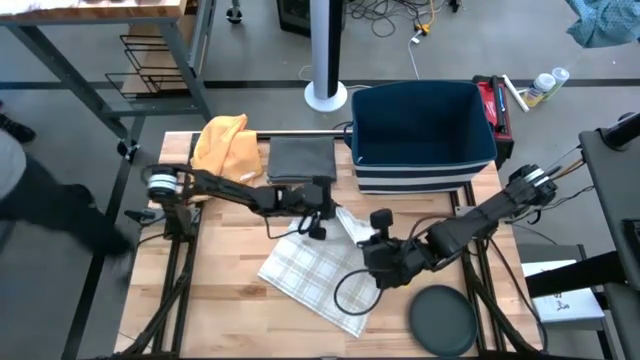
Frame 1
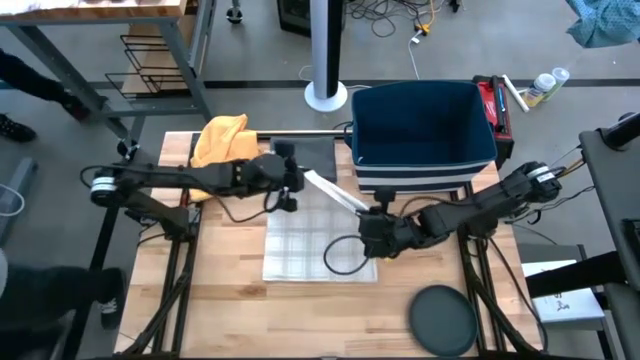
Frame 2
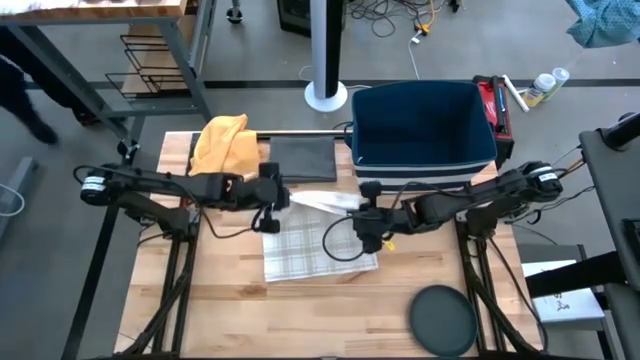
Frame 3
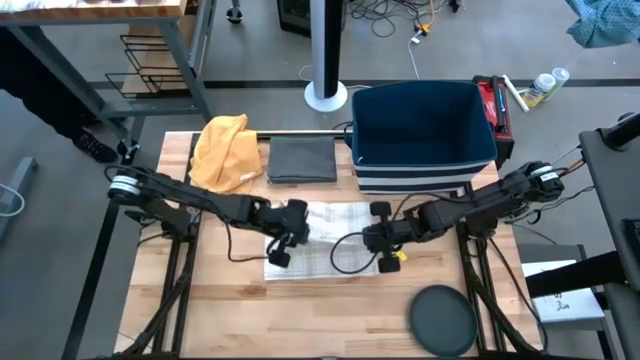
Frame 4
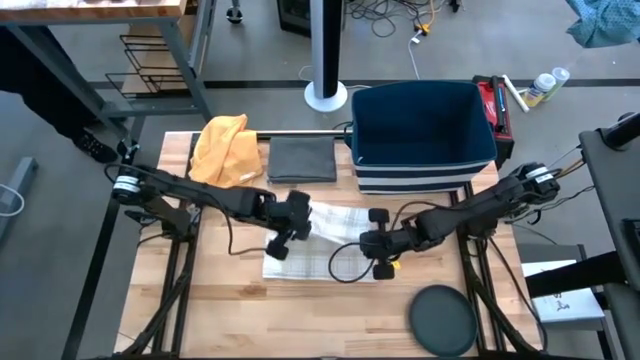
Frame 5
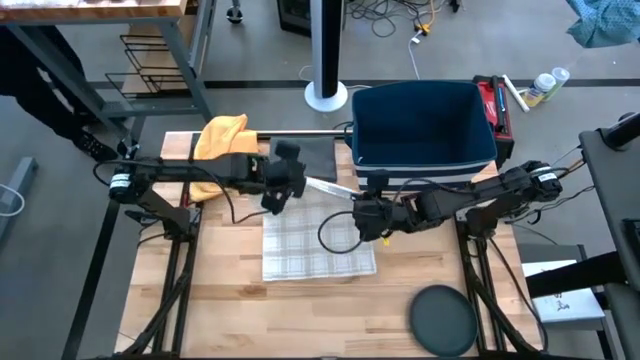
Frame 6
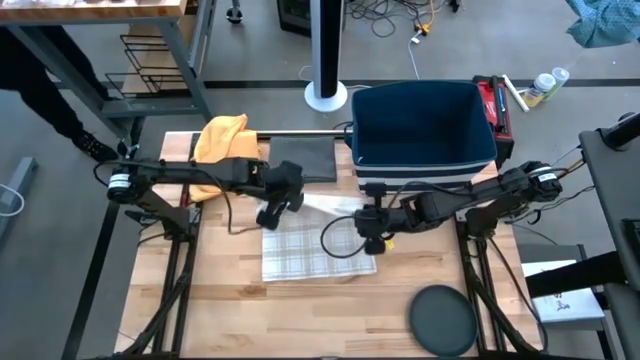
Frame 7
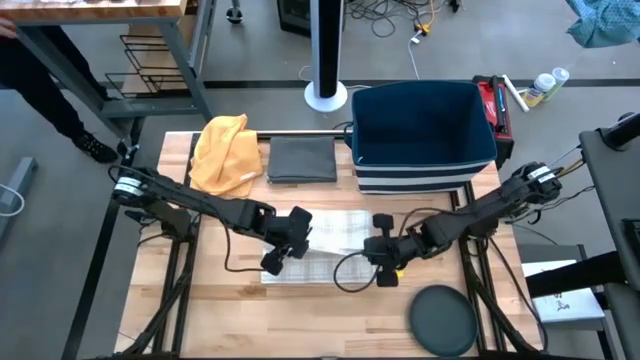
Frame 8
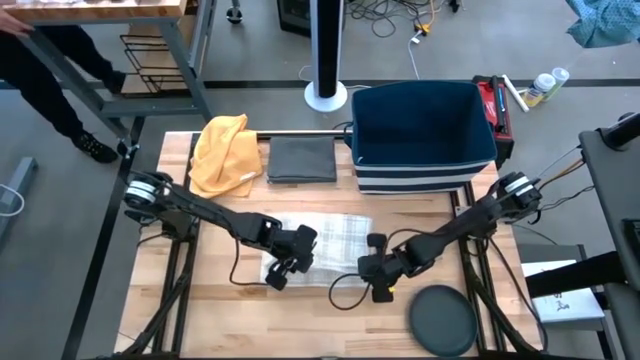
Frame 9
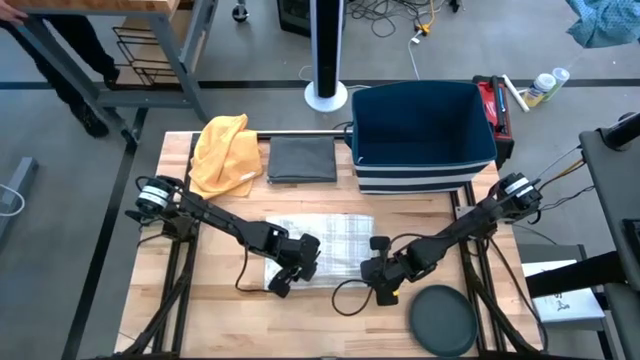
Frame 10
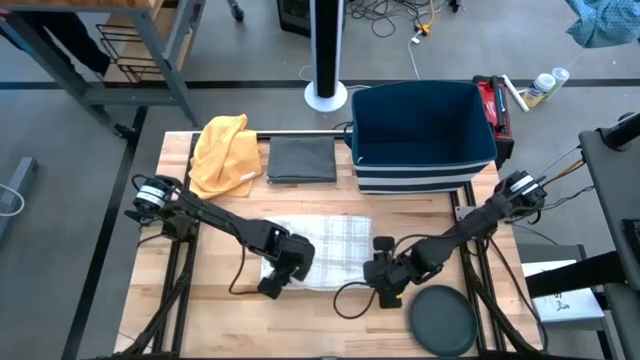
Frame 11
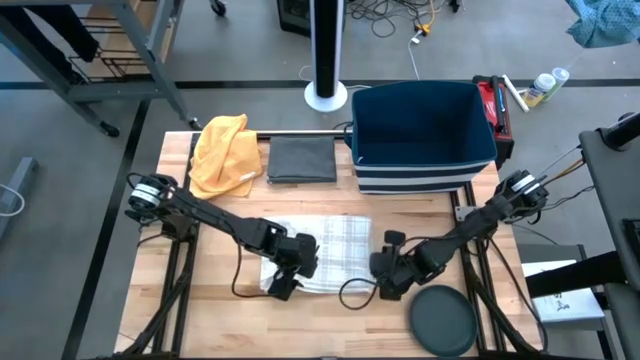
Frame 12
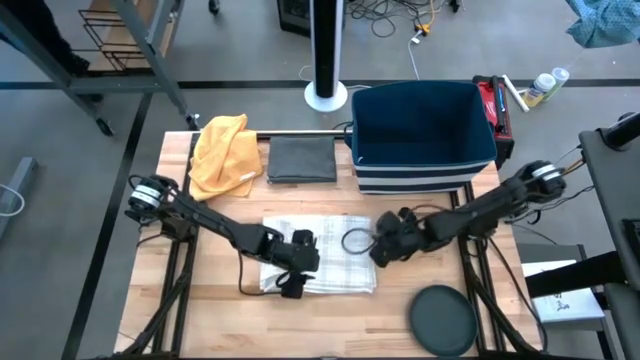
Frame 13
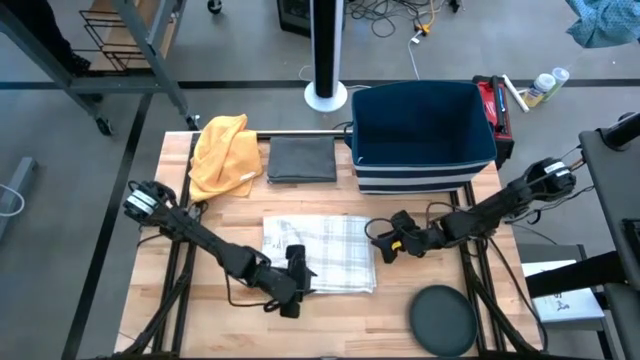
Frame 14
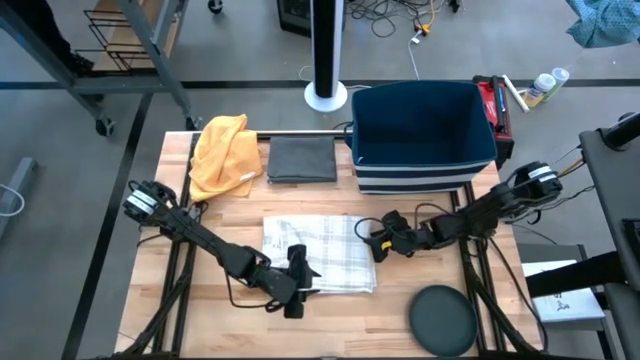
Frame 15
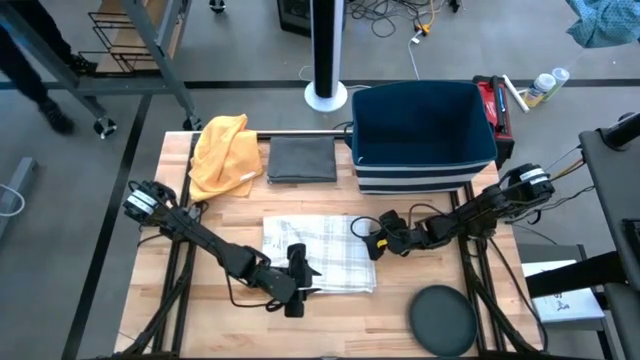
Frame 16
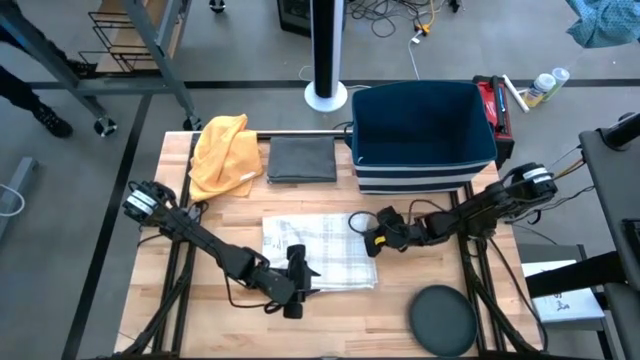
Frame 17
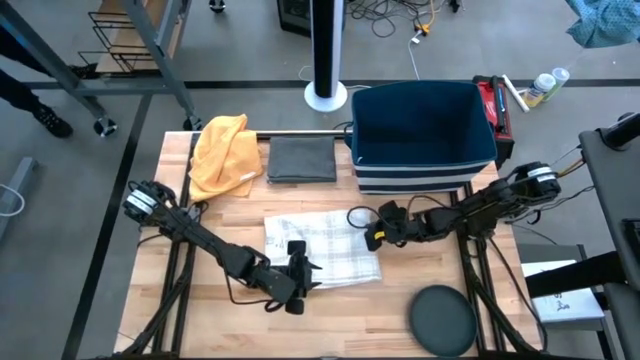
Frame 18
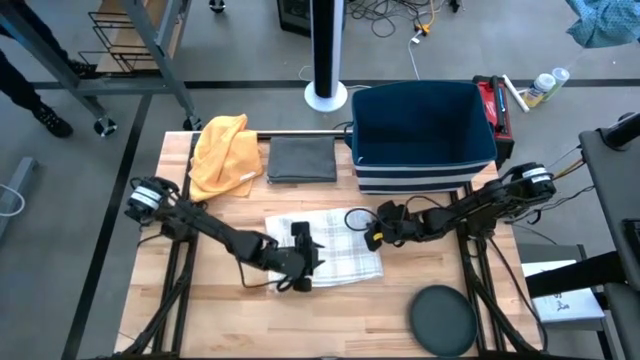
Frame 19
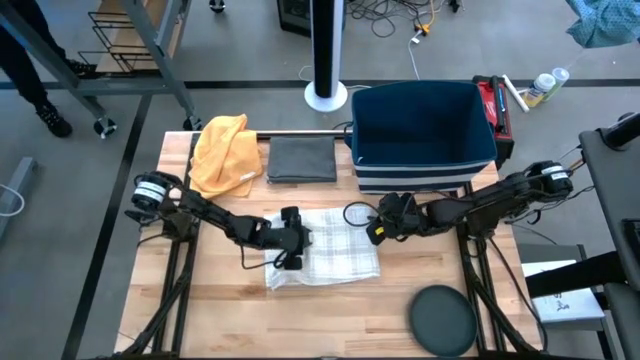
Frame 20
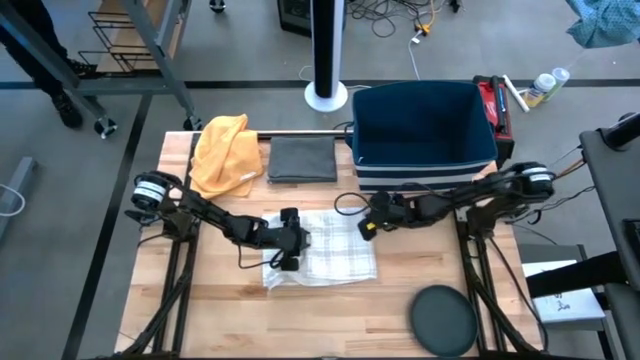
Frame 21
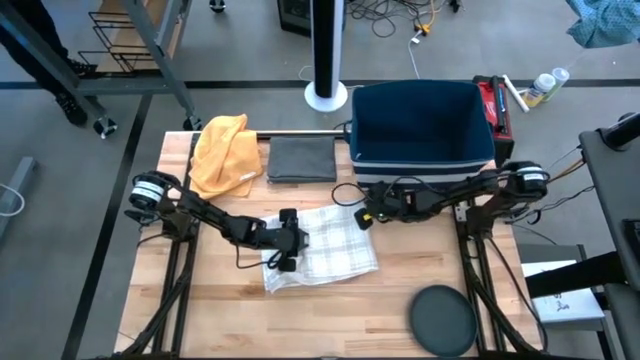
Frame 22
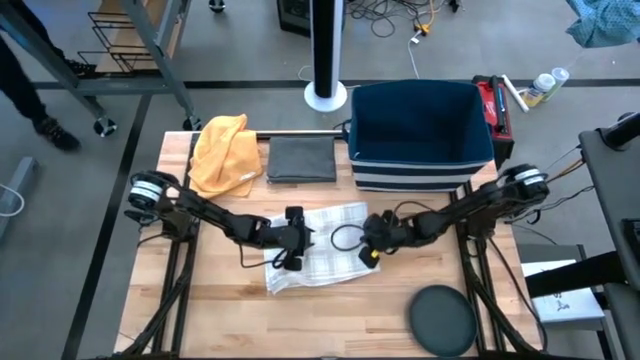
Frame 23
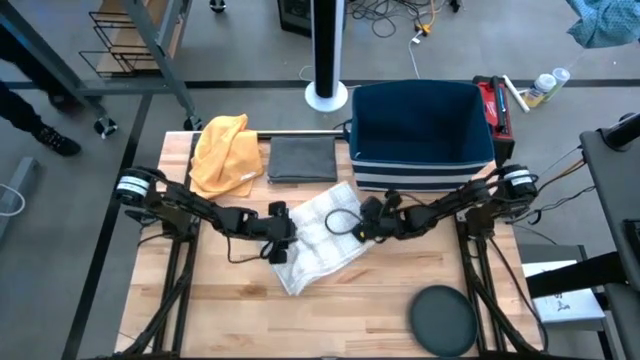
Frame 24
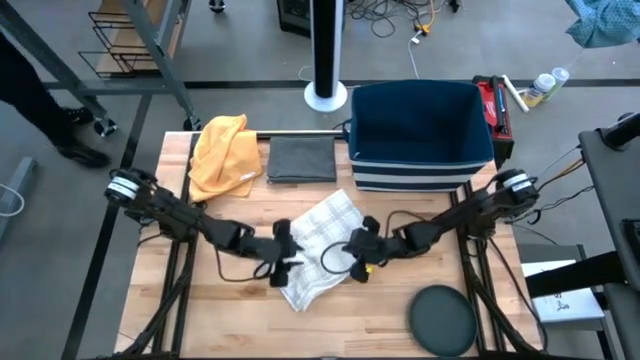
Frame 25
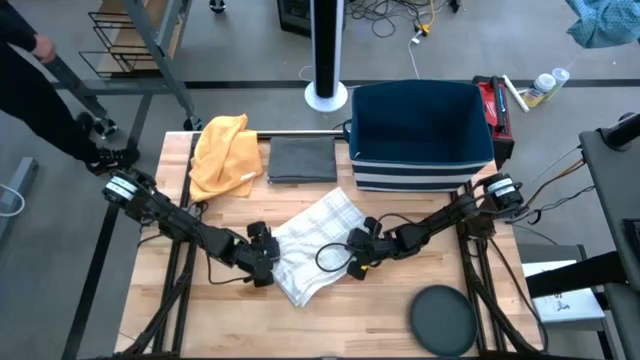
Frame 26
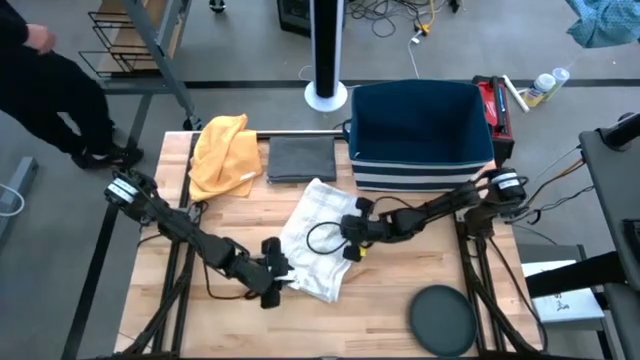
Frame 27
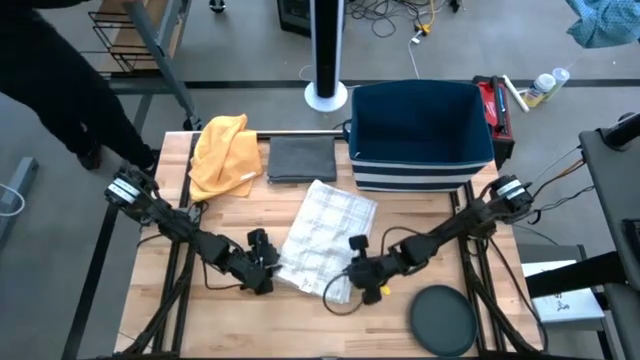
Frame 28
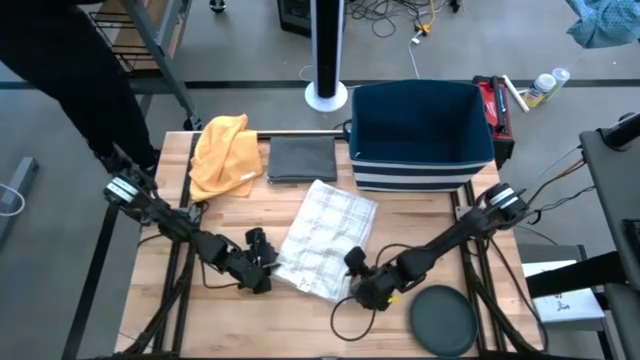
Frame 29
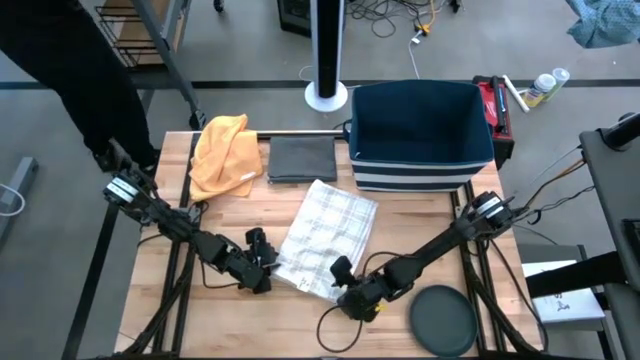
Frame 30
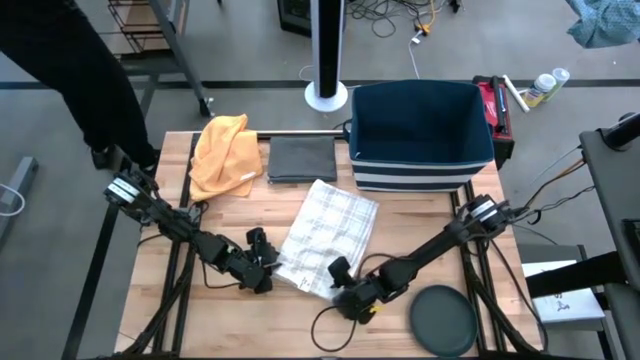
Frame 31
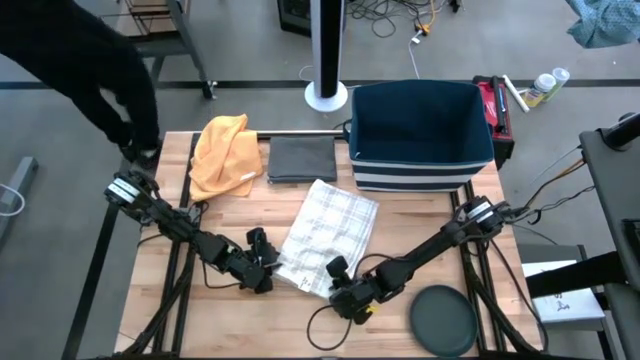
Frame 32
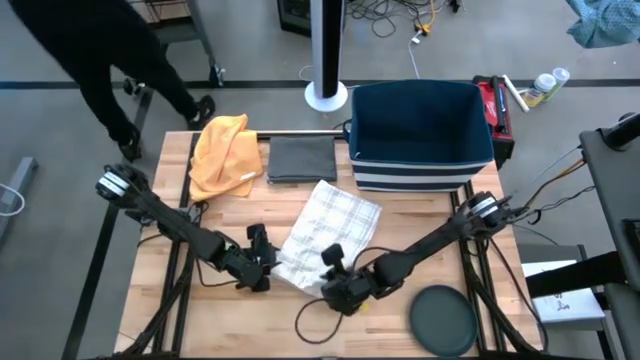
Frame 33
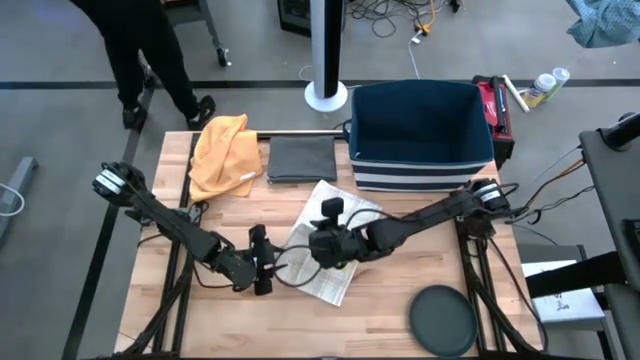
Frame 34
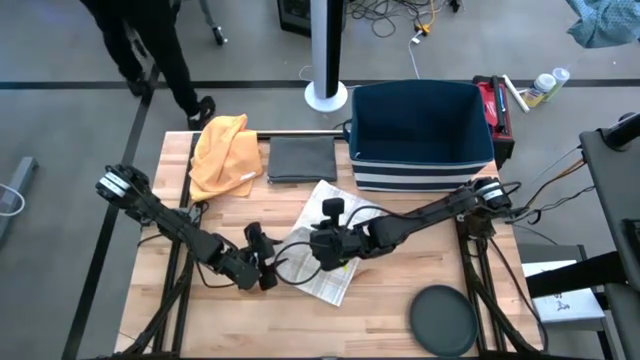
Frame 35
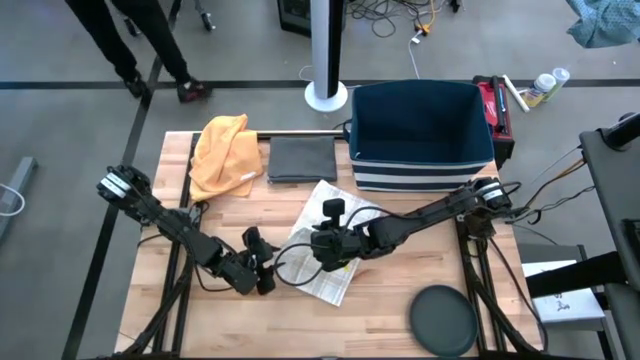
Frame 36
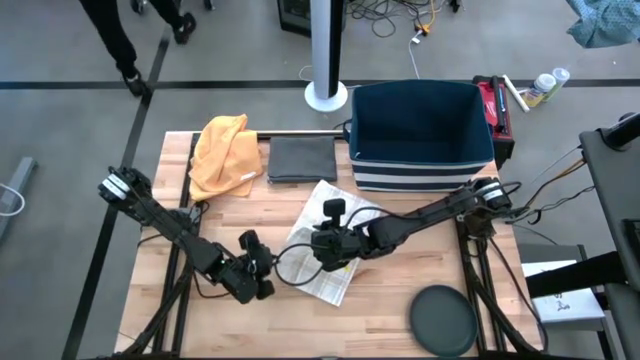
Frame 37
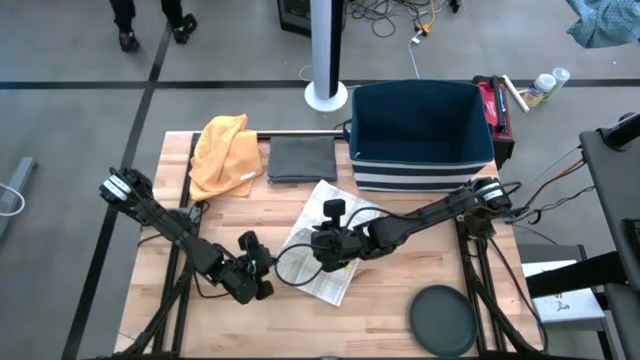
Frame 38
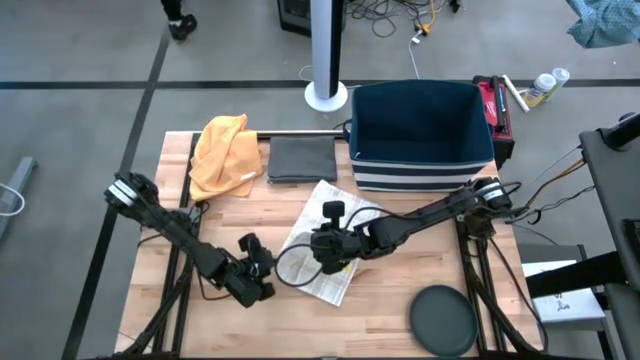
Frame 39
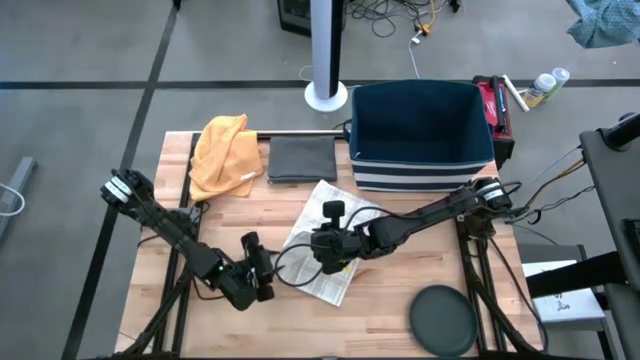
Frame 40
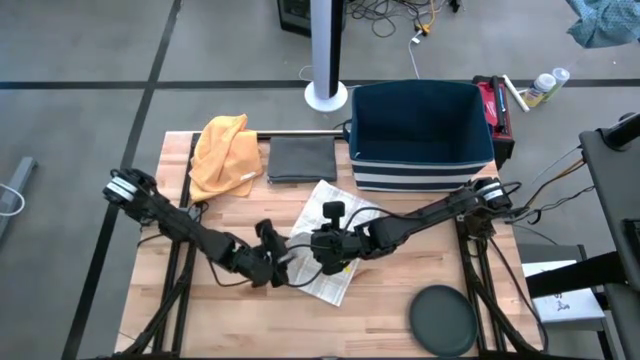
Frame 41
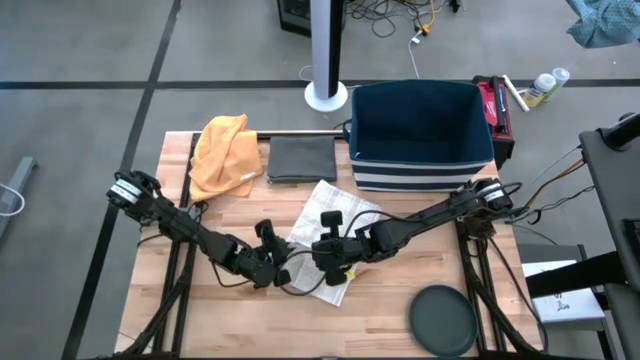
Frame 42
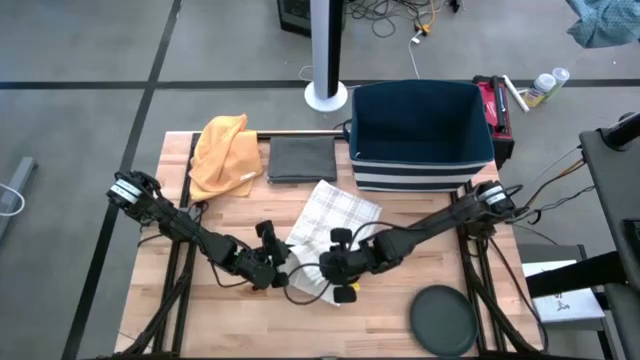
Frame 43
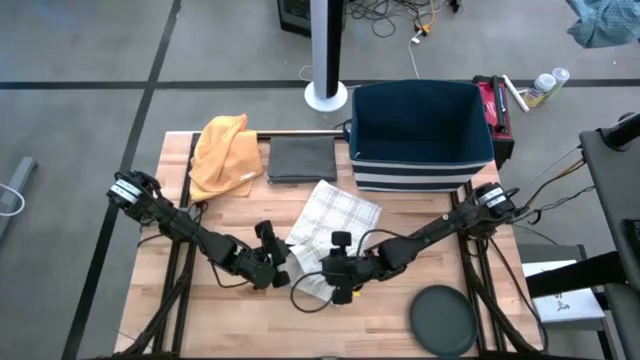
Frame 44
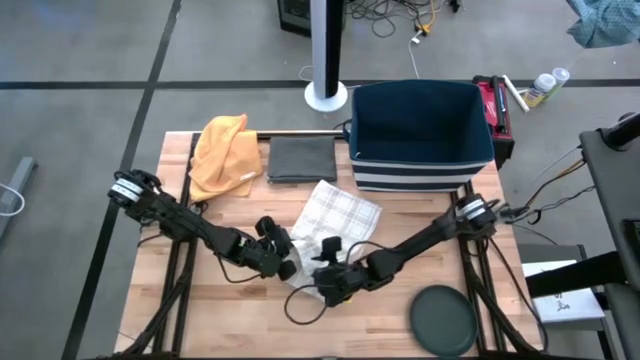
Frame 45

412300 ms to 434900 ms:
Task: Fold kitchen towel into neat rectangle
Fold the white patterned towel
